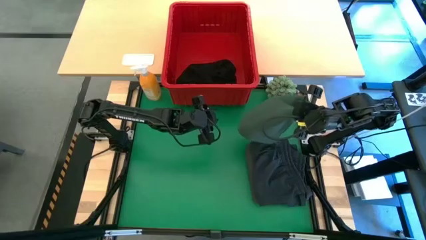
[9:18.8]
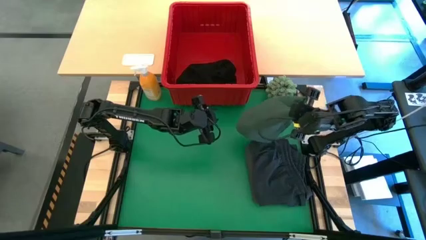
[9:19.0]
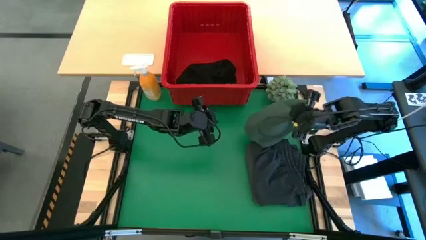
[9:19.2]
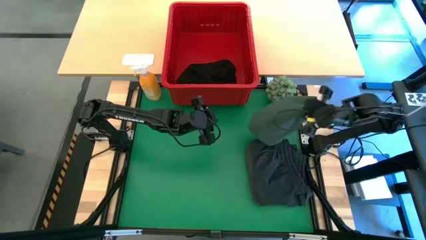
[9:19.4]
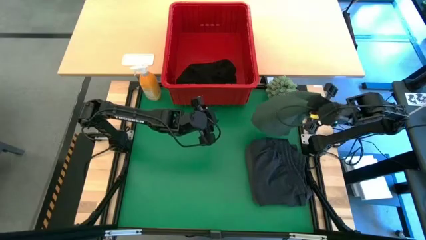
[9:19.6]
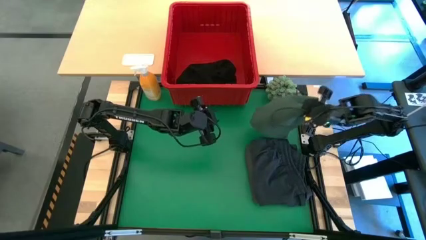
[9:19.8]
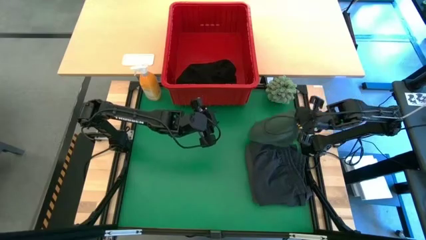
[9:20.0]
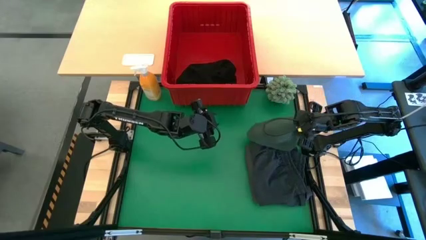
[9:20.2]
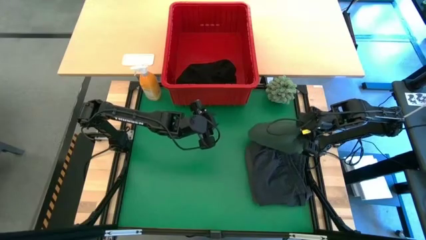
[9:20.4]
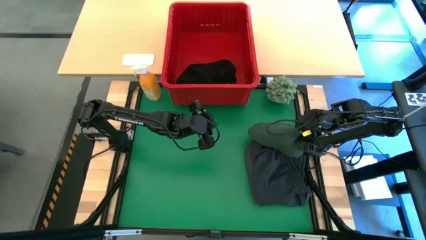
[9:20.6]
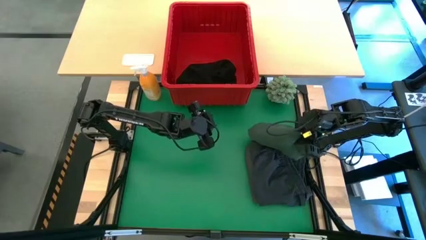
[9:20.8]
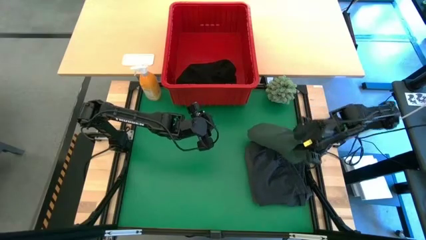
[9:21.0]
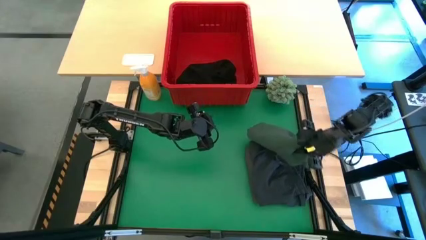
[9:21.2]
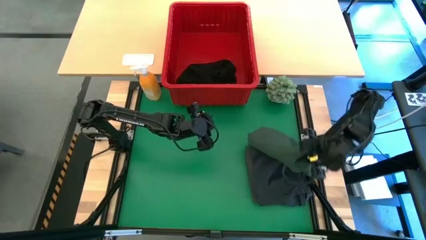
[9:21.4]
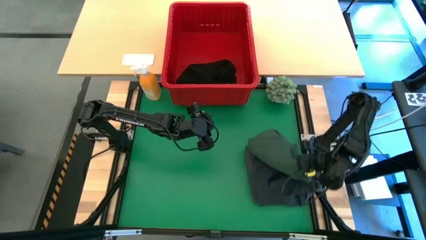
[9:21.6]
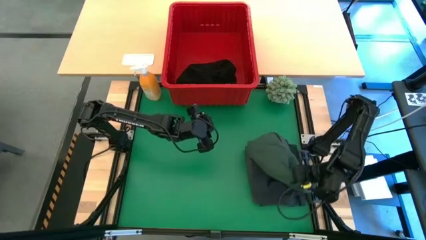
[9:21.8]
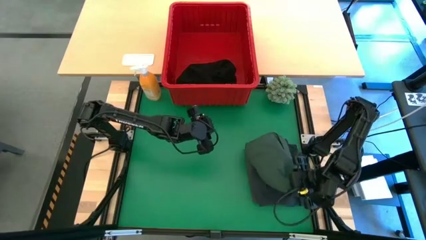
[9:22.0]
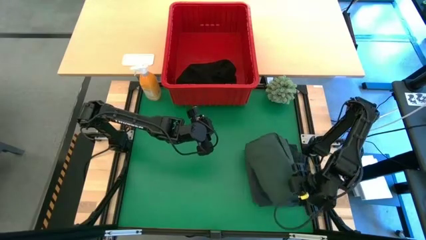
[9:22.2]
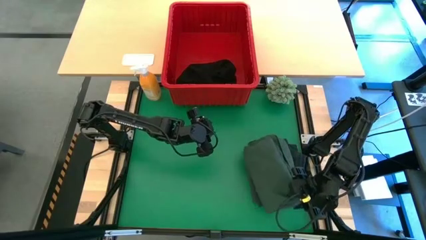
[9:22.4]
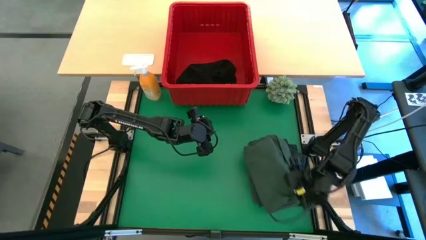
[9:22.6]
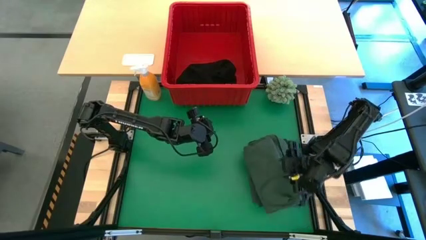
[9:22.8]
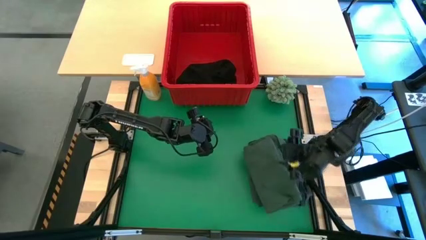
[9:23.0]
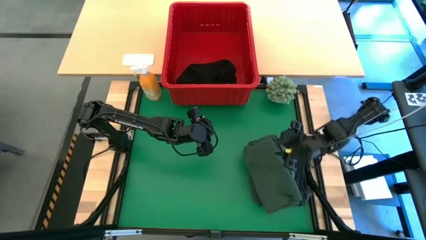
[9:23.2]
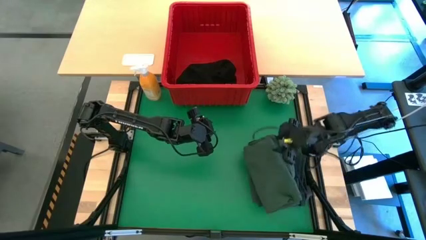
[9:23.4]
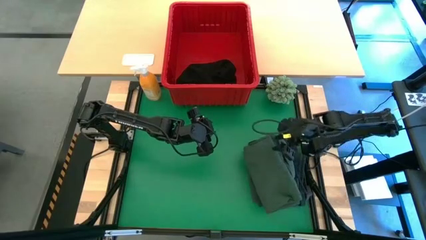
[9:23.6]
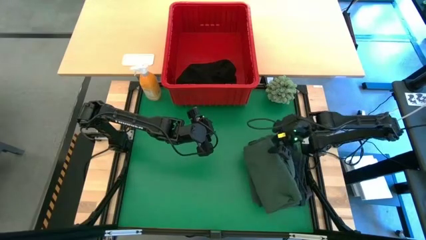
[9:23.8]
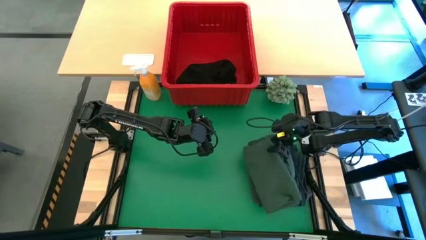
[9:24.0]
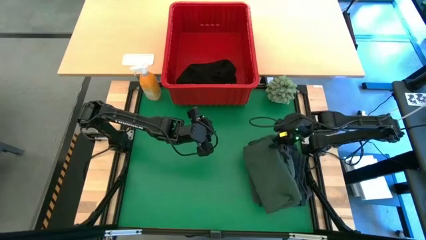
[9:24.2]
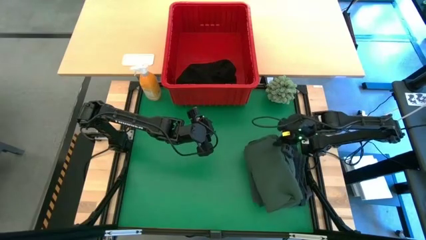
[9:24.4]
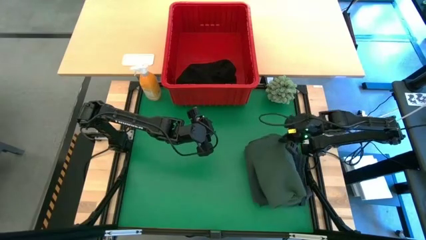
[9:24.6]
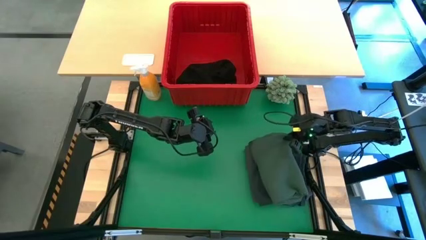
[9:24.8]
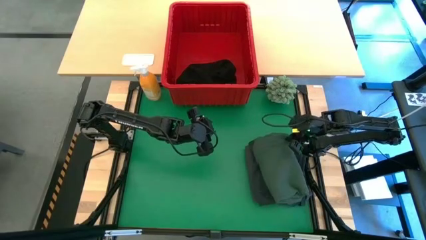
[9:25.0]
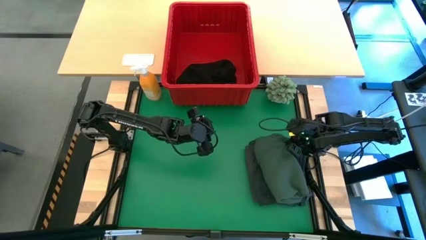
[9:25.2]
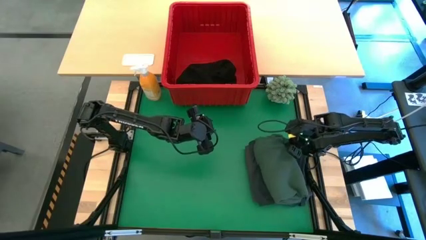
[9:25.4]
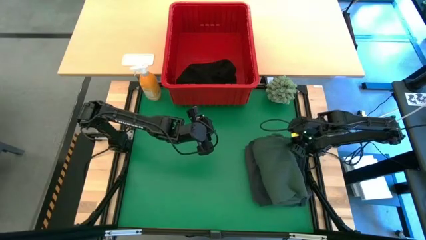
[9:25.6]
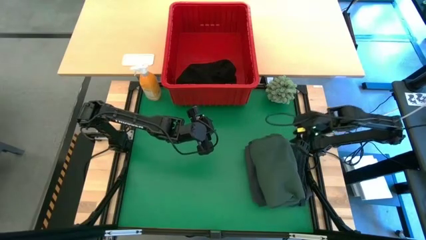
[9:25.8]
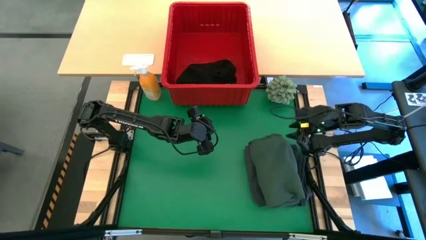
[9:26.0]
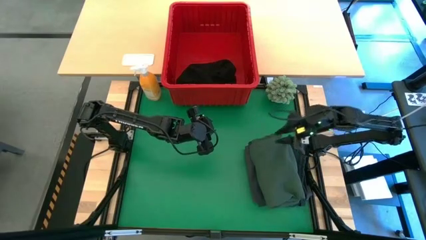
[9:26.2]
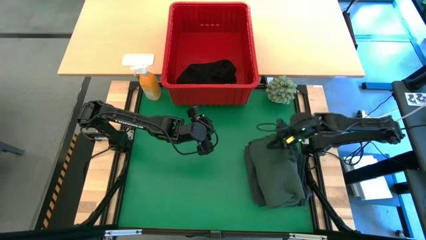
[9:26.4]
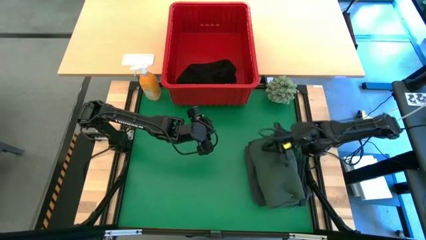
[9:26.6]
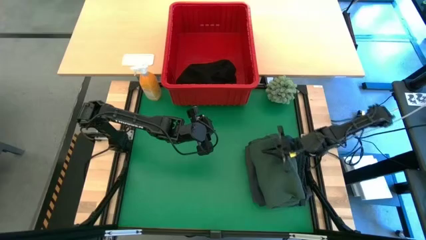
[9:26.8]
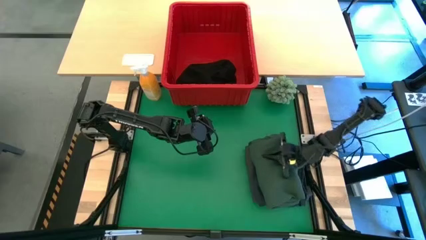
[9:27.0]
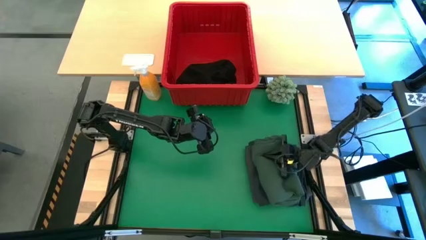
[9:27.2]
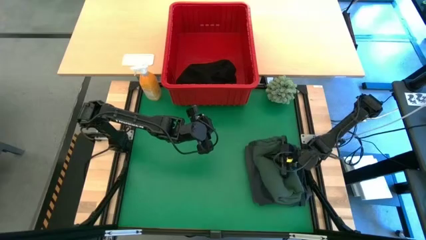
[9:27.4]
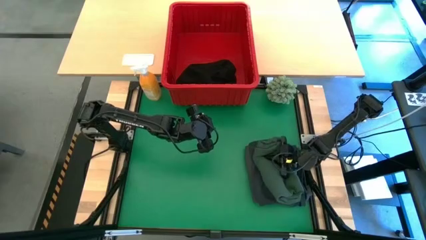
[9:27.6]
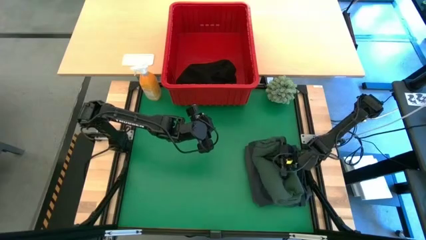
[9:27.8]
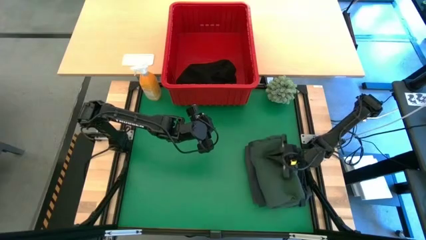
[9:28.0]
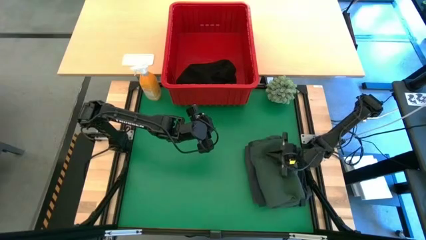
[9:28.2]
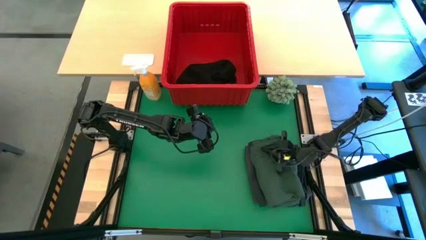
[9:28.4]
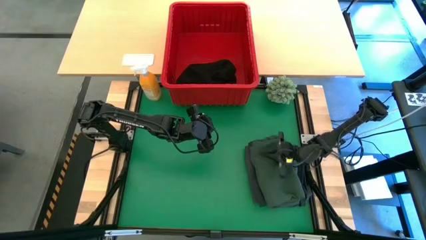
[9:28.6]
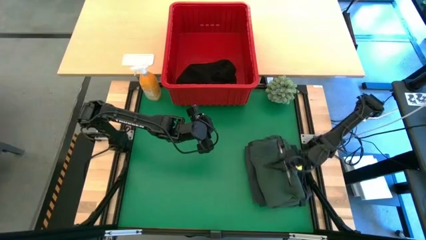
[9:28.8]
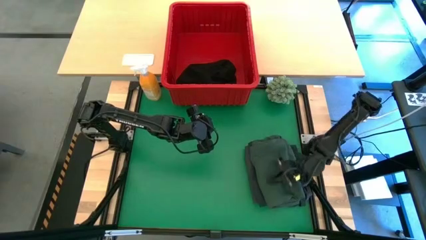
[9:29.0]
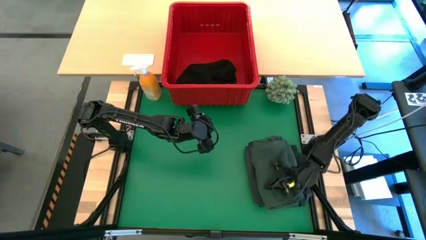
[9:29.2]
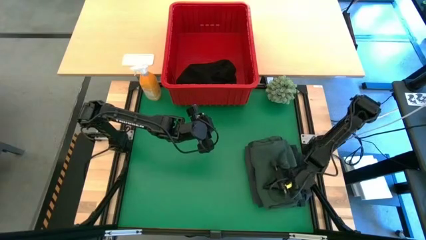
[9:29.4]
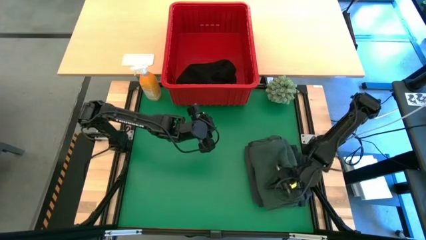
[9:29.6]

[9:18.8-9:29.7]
Task: Fold Laundry from Bin
Stack the green polo on top of the dark gray short

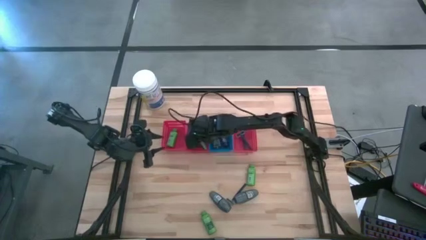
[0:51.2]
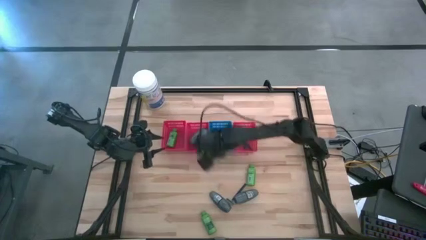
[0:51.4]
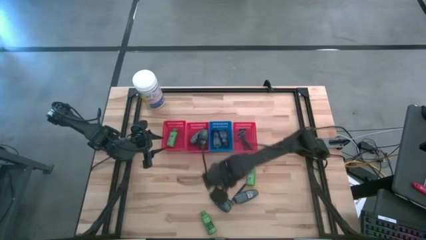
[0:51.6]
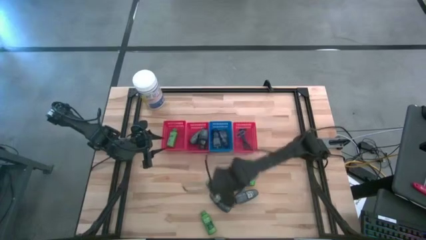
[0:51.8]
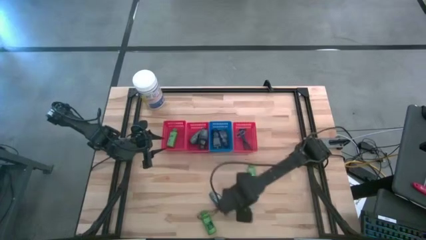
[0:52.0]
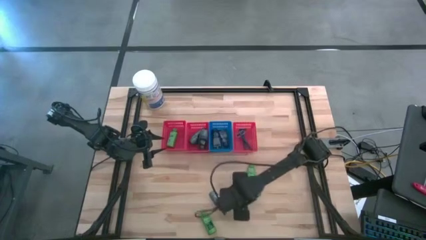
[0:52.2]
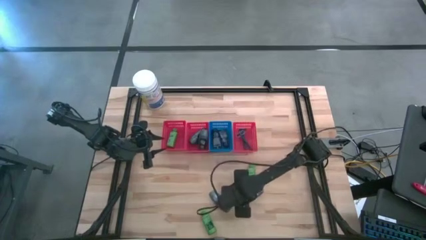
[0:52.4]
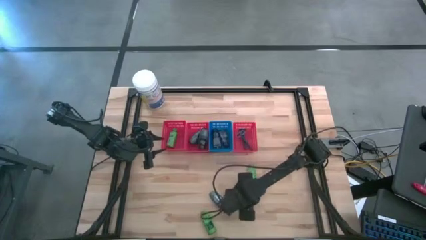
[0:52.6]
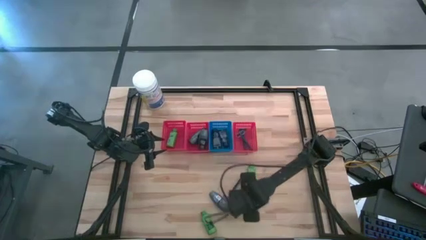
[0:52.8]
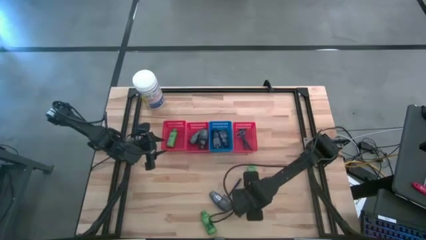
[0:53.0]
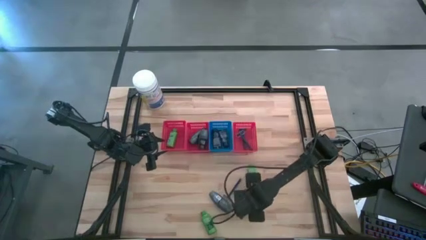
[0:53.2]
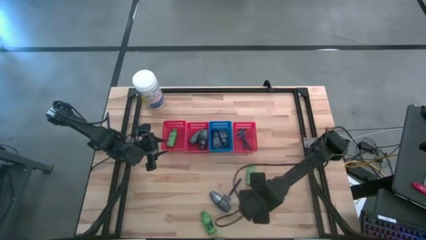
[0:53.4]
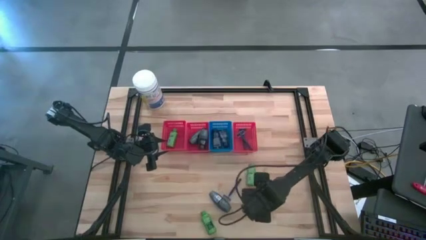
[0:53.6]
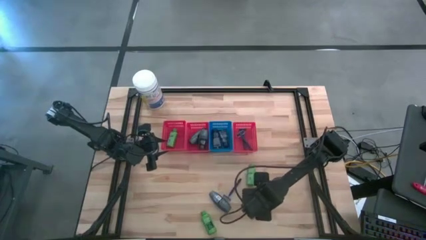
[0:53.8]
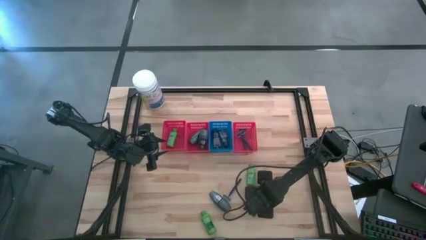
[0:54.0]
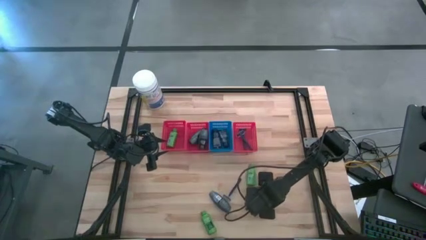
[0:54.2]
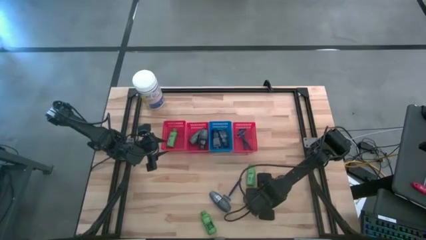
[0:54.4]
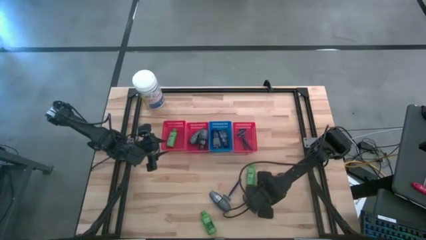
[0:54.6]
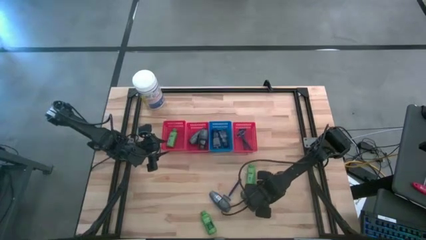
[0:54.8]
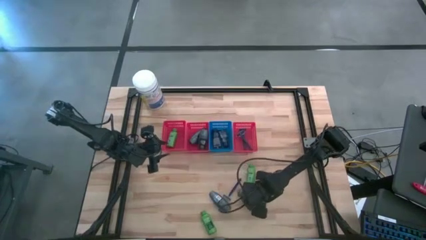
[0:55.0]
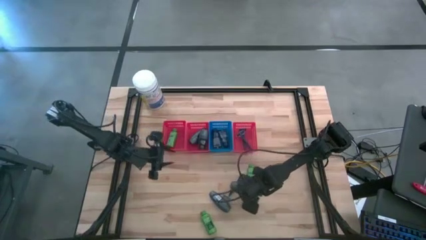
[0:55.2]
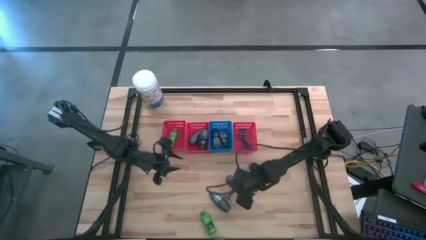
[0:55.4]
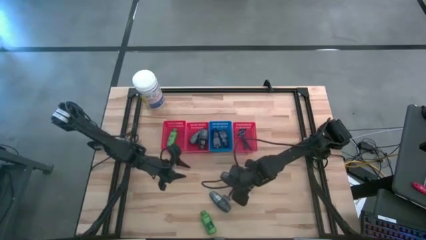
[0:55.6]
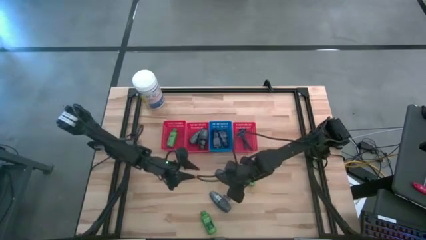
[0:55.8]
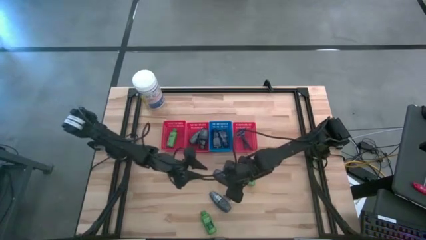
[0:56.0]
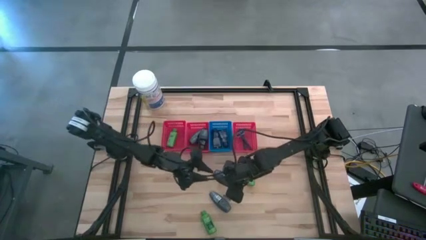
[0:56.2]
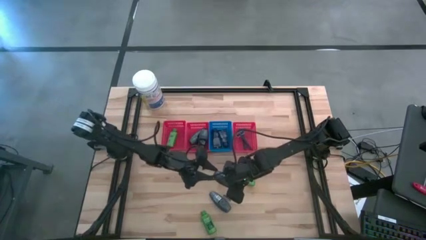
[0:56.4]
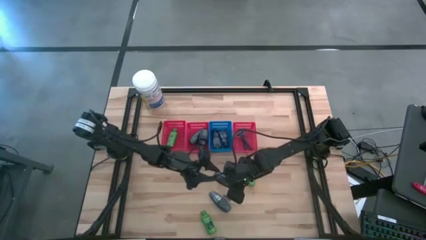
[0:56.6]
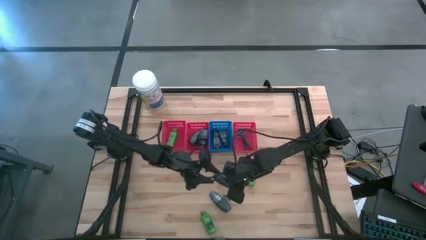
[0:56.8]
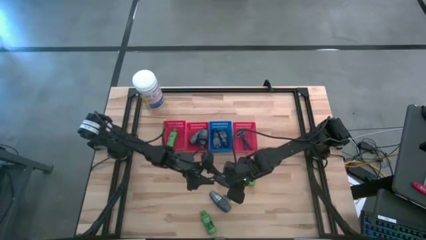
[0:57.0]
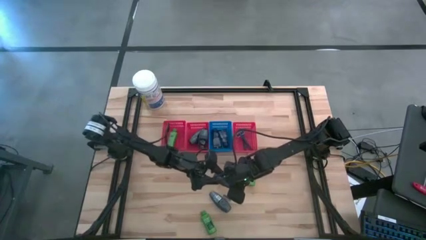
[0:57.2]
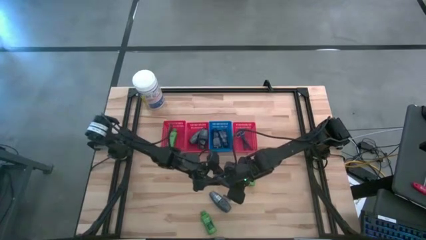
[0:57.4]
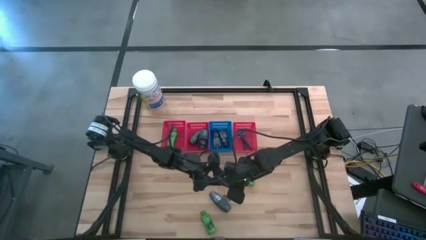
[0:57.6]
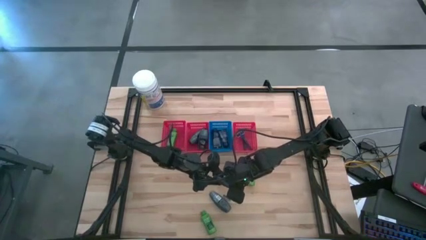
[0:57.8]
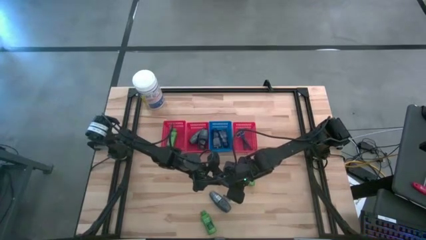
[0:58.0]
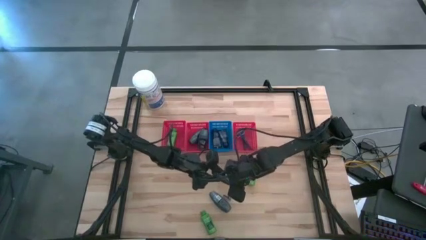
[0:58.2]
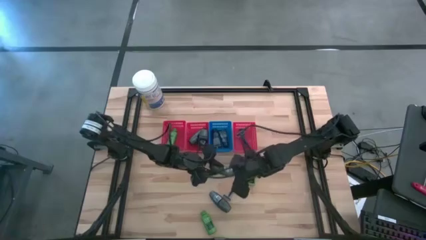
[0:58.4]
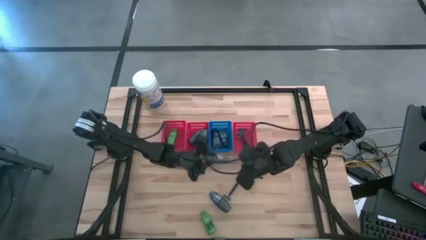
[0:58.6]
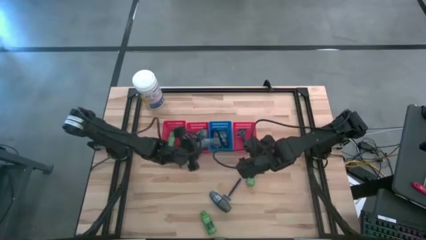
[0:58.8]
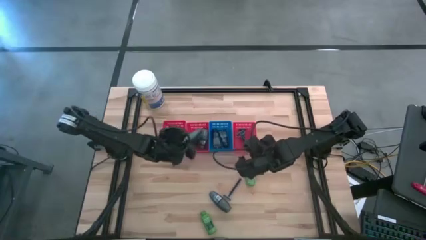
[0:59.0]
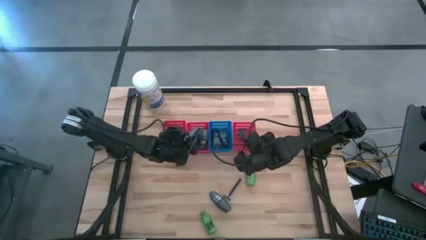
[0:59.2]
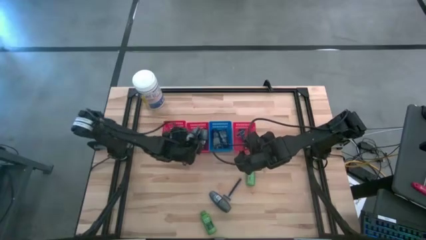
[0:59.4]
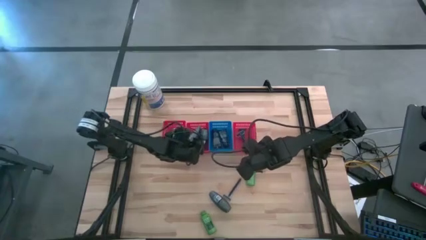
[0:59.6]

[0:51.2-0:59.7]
Task: Pick & Place Travel size toiletries
Put the gray deodorant into the middle red bin
